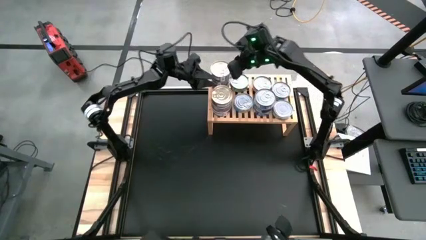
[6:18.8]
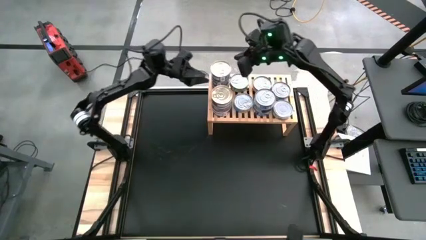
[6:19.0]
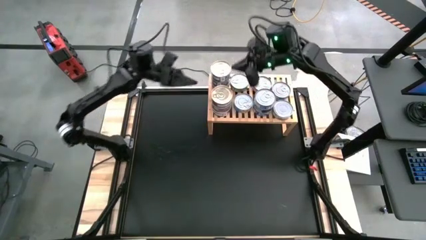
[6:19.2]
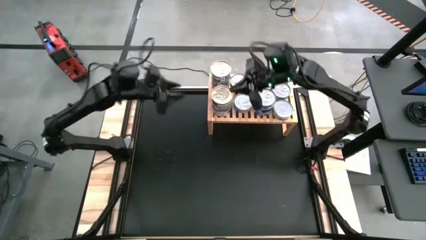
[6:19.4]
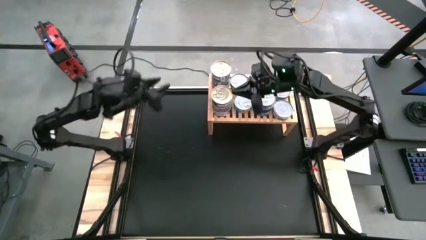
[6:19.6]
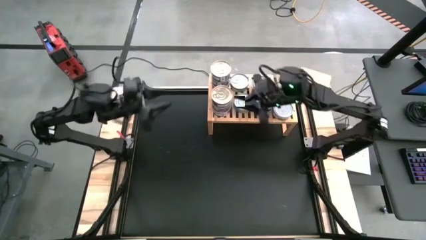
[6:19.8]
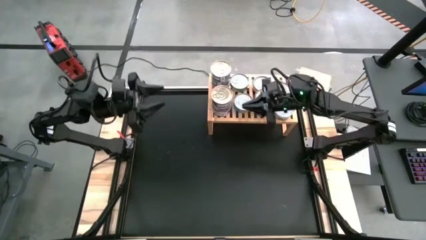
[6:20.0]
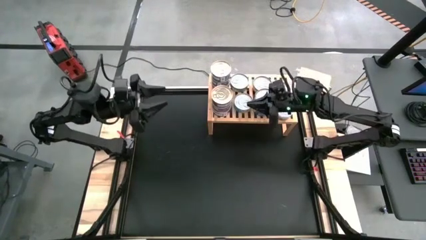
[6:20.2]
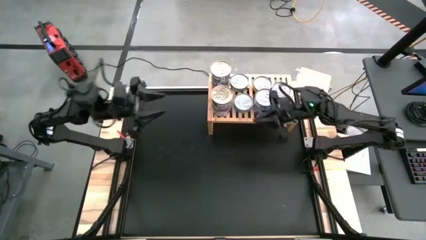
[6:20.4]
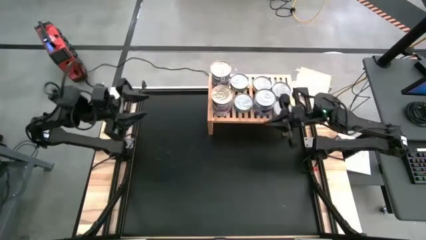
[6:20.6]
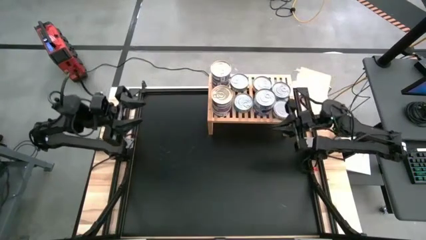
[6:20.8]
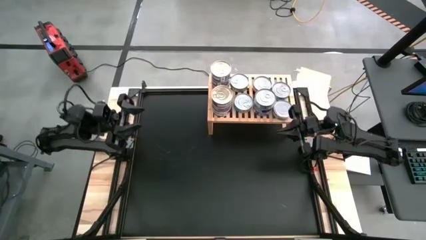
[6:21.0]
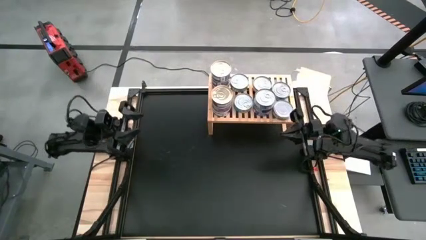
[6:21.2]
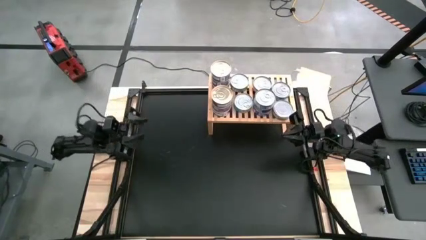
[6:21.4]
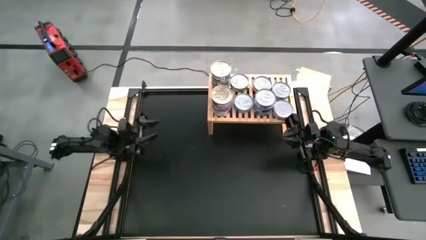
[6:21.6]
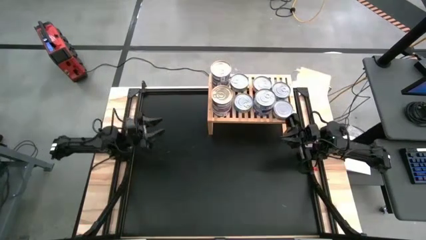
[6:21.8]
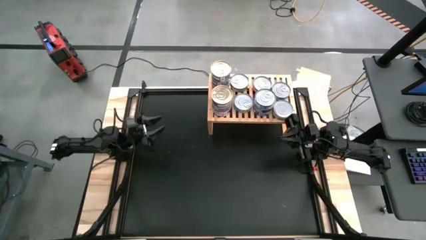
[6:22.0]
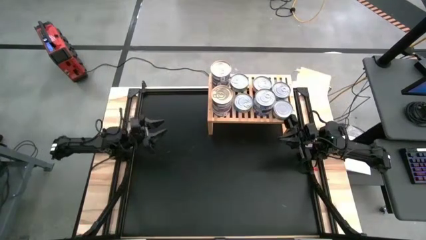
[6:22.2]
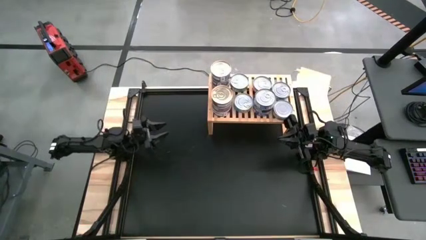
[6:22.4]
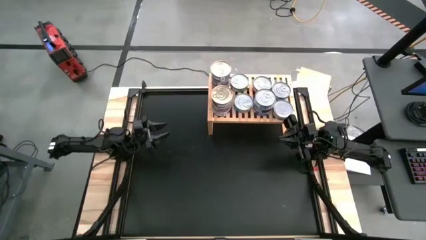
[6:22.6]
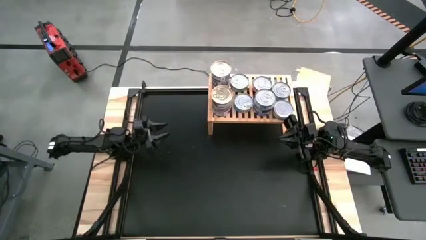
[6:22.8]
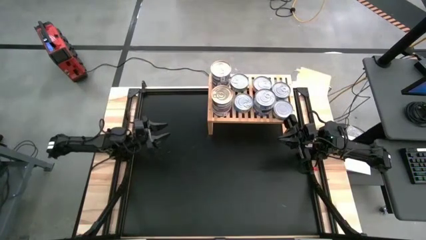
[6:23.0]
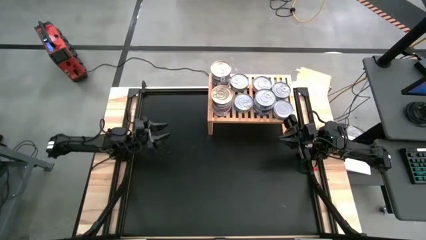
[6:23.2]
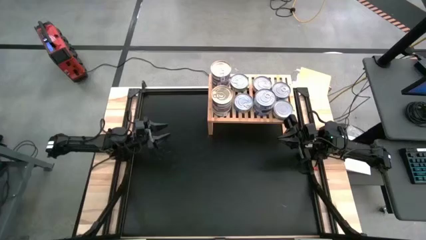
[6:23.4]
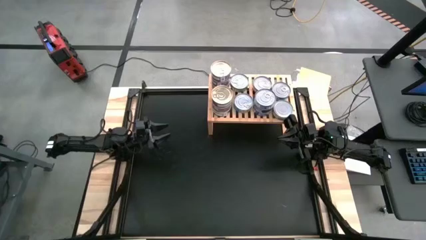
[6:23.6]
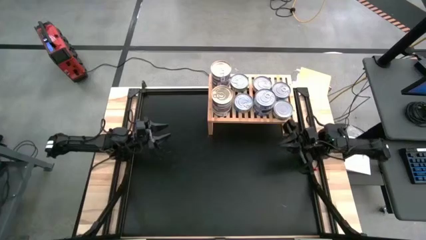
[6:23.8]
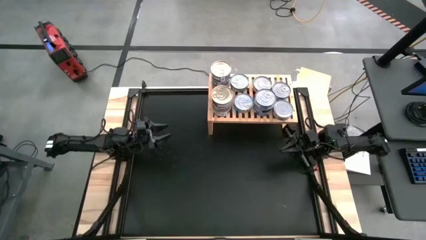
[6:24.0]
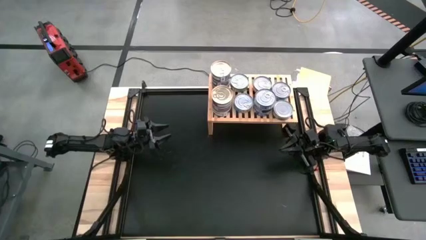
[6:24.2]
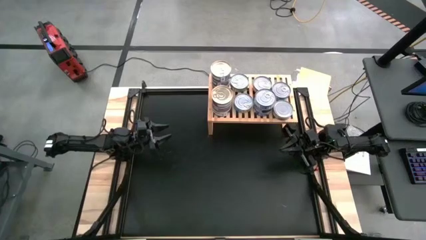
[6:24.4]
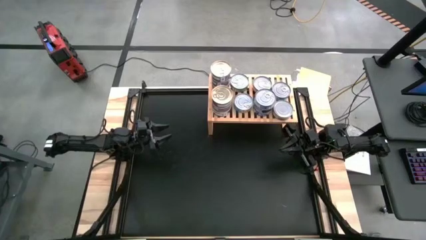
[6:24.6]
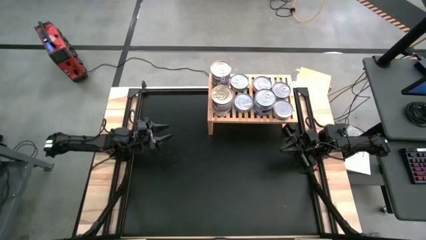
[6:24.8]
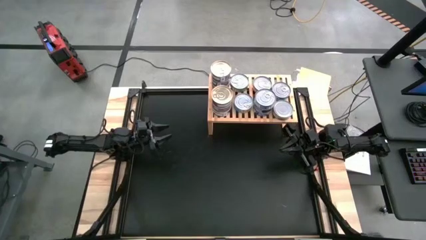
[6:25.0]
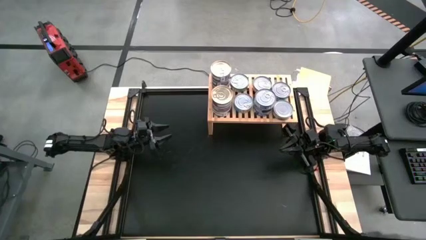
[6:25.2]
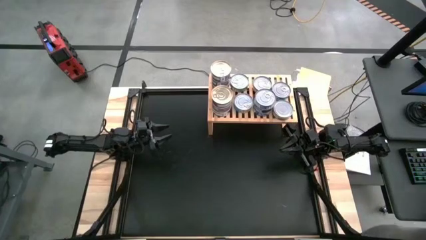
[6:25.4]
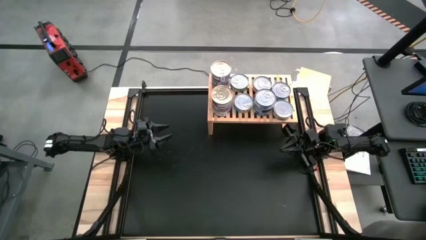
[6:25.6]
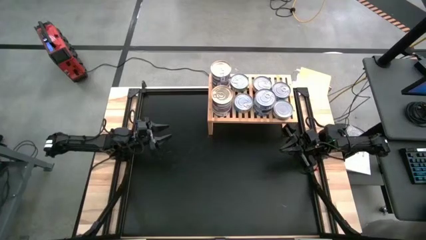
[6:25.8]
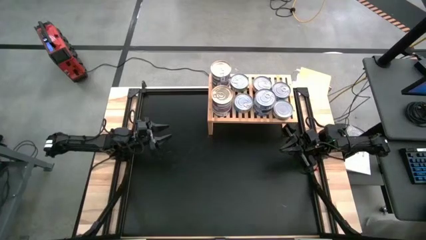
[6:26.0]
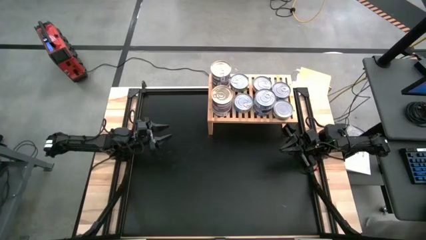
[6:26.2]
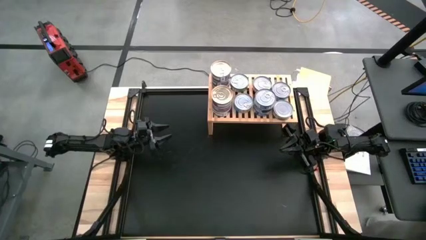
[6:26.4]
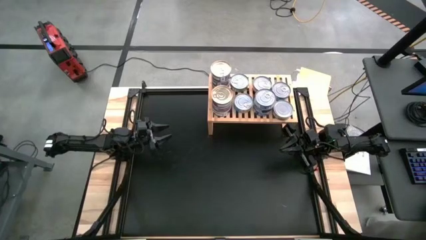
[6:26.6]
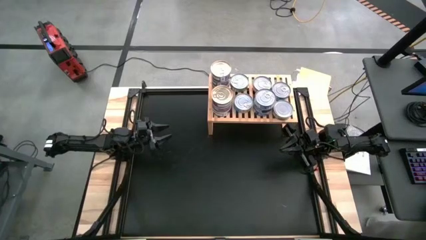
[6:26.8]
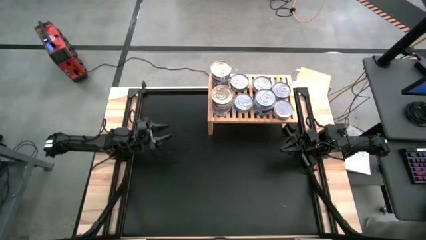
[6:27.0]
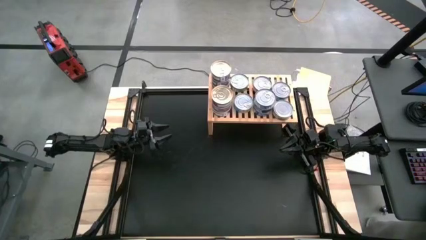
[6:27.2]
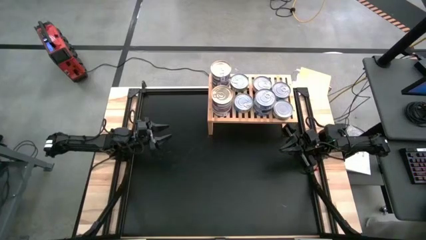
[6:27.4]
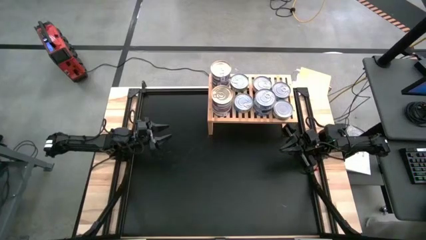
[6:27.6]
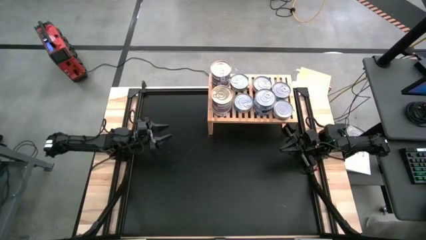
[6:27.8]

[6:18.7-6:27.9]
Task: Stack canned seafood by type on shelf
Return to Home Position
